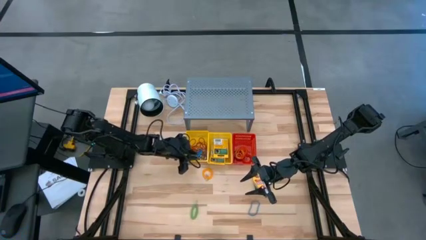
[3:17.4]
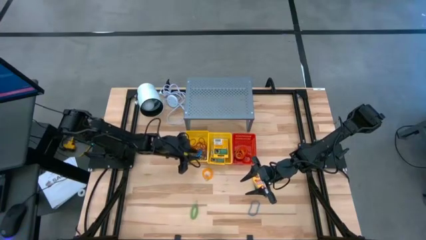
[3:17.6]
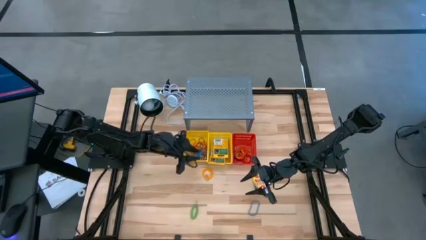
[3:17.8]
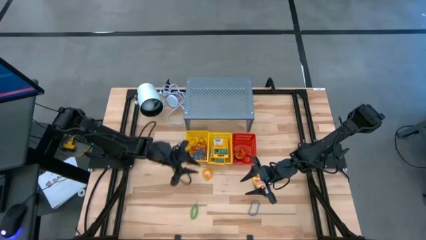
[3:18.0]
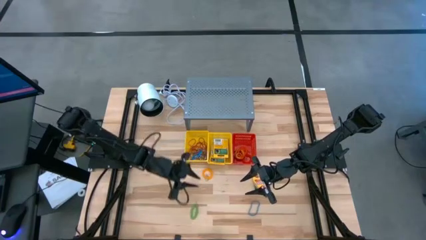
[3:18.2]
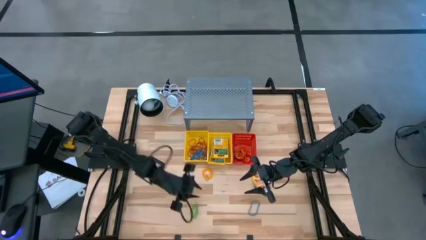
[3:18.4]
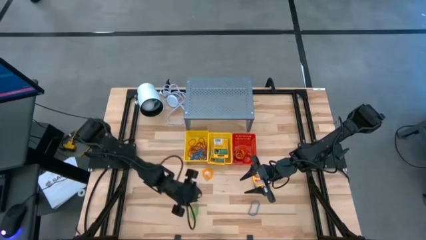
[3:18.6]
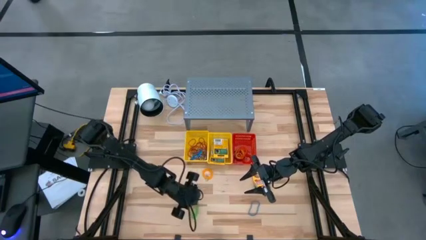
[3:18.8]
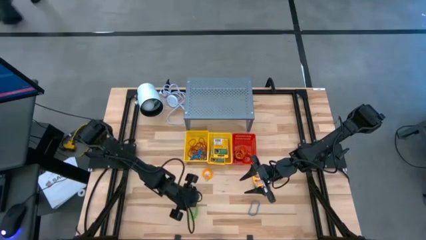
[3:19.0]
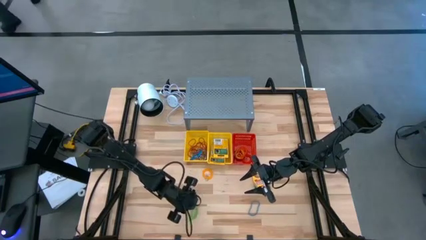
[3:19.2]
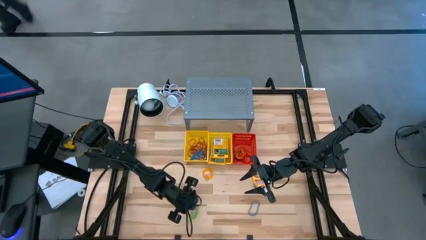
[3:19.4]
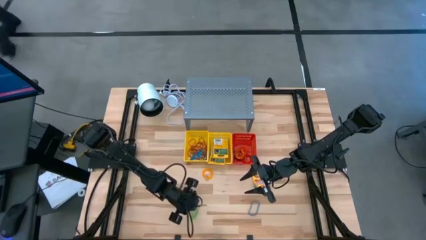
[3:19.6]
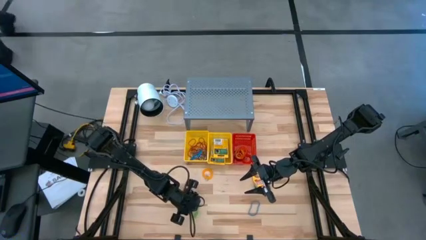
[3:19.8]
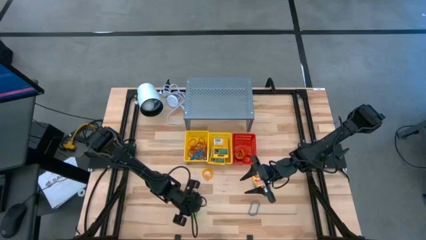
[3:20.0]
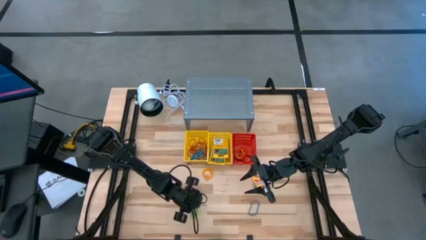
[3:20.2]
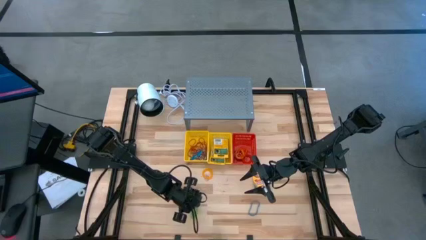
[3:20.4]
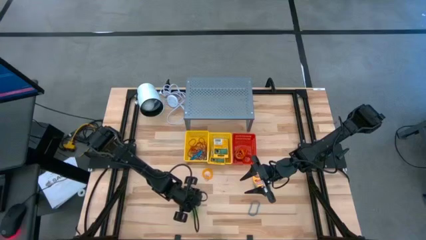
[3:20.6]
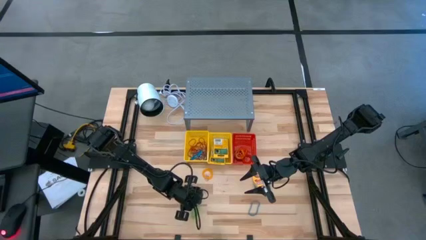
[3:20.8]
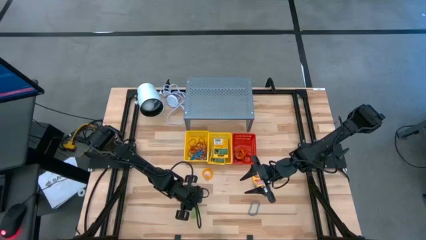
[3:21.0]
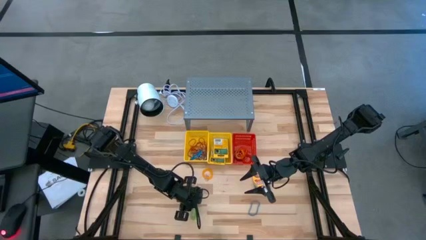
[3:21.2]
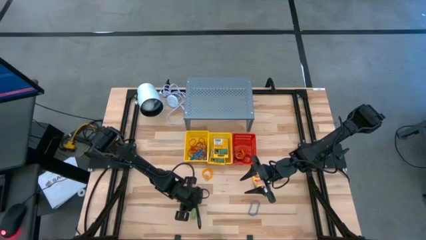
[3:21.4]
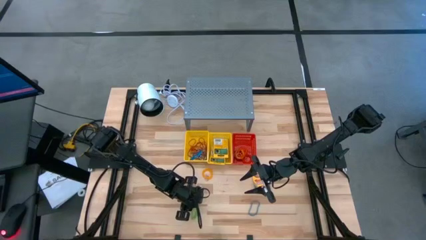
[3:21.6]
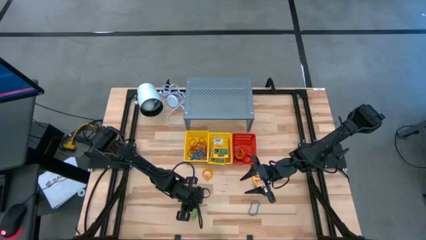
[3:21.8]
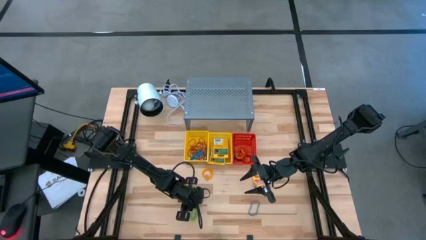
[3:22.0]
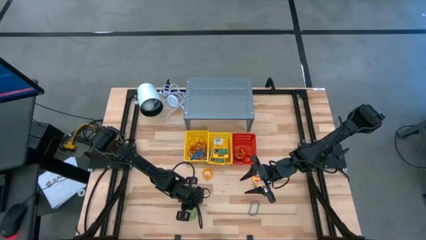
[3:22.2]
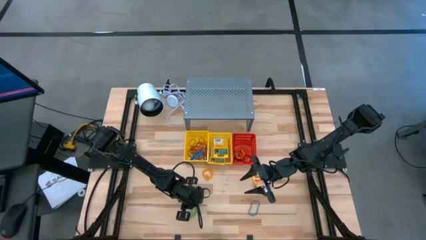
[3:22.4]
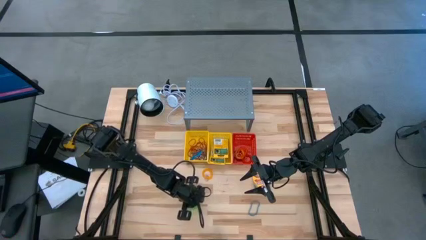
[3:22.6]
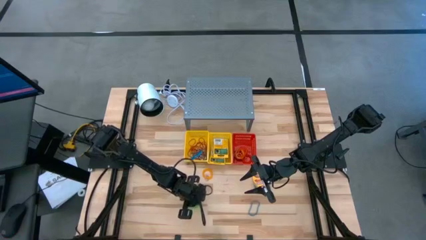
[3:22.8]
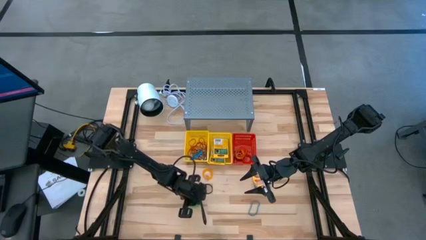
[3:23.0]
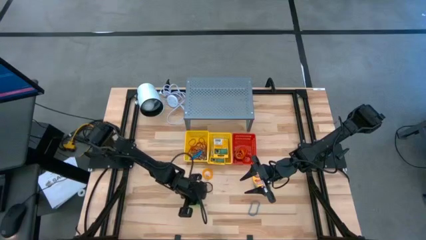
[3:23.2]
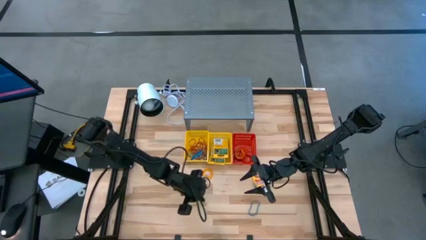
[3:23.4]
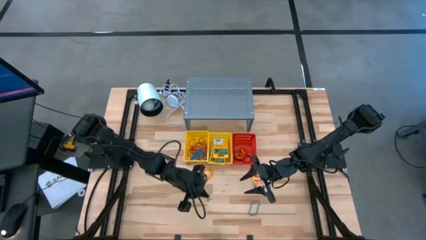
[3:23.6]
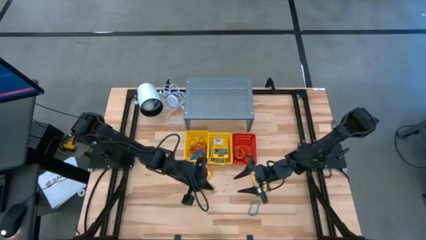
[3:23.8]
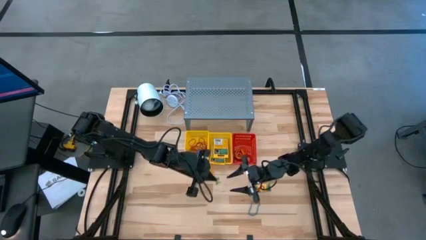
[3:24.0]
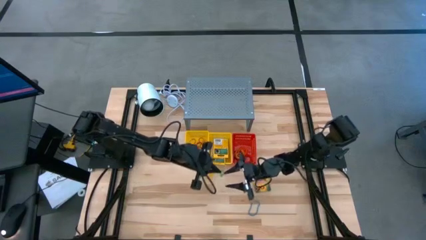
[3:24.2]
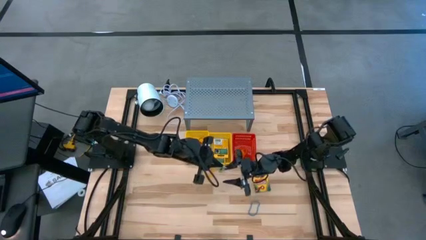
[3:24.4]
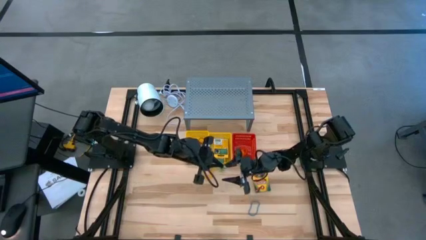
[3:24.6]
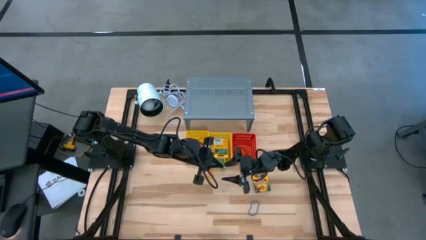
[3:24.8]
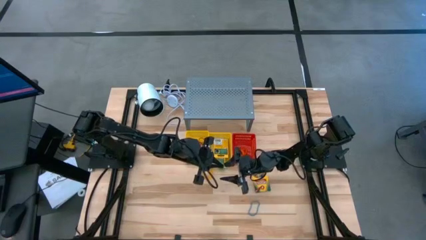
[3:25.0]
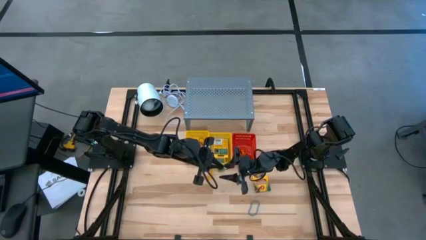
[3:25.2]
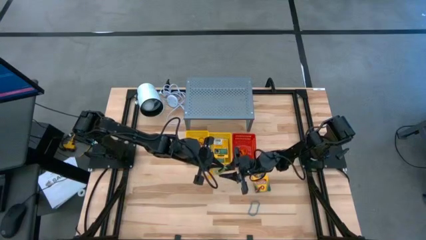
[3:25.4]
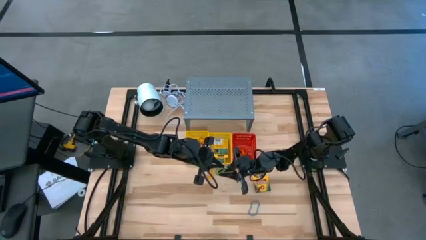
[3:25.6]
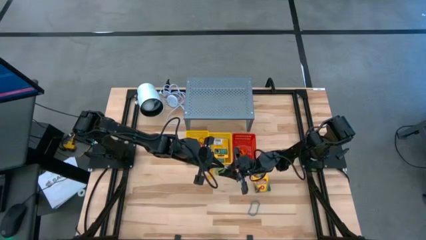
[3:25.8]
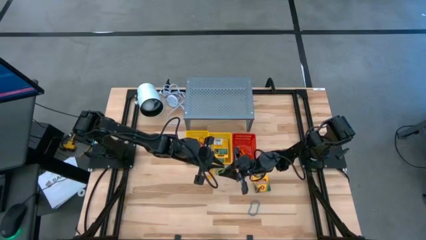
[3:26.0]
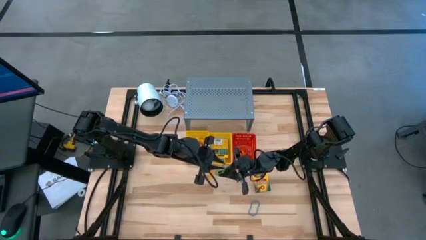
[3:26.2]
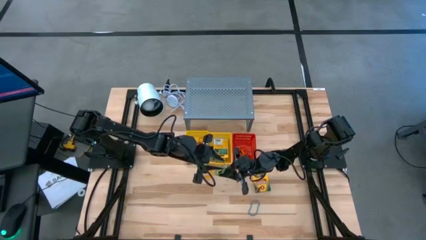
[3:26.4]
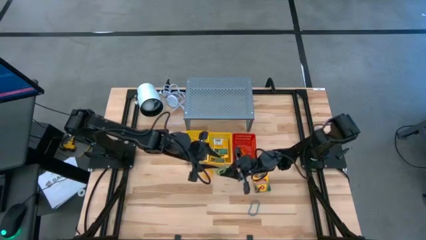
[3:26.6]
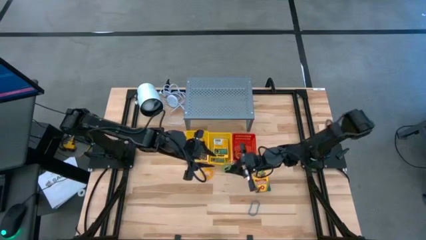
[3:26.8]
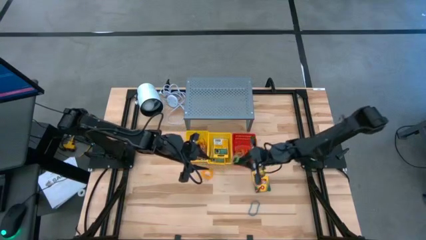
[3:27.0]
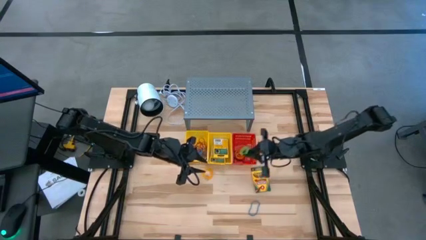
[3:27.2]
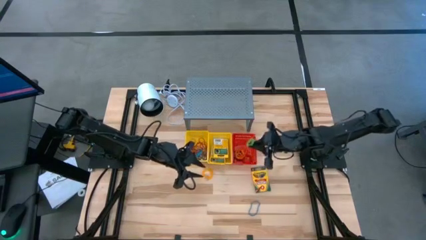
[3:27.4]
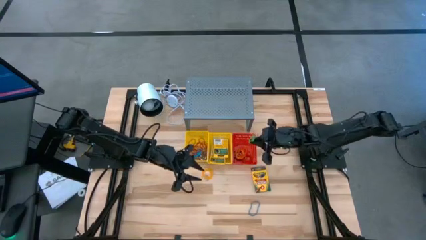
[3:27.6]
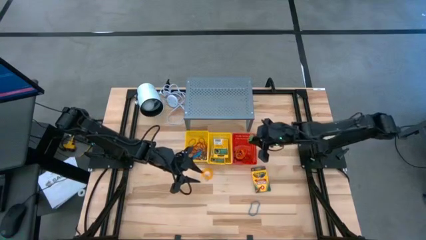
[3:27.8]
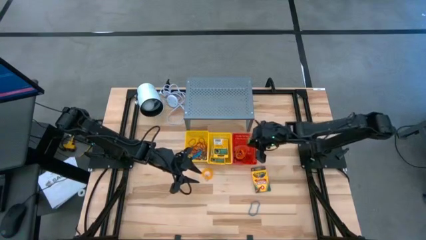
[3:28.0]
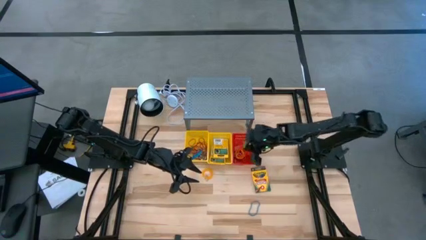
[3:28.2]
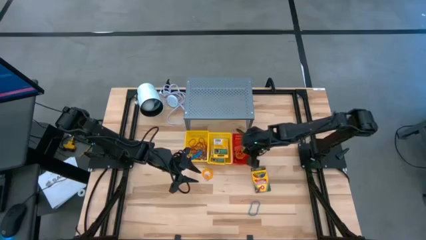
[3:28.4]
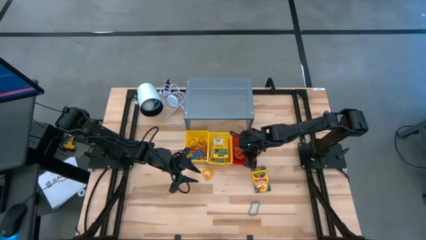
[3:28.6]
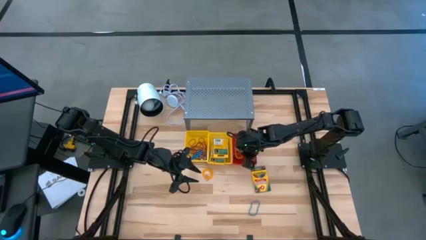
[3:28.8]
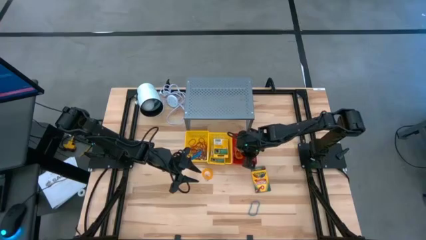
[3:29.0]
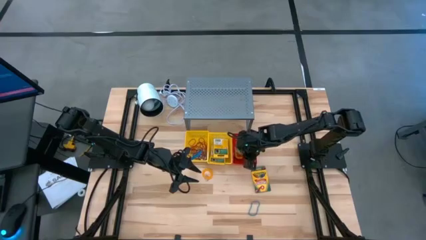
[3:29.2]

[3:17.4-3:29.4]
Task: Pick & Place Office Desk Supplies
Put the green spring keychain into the red basket

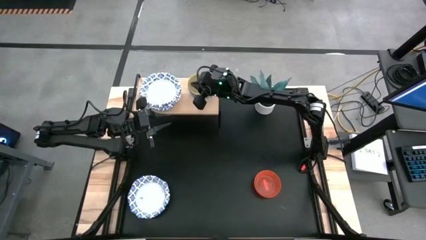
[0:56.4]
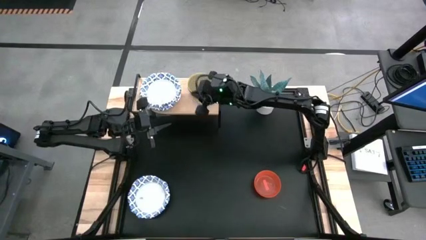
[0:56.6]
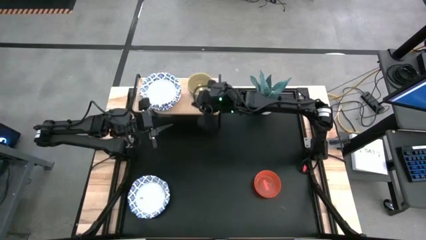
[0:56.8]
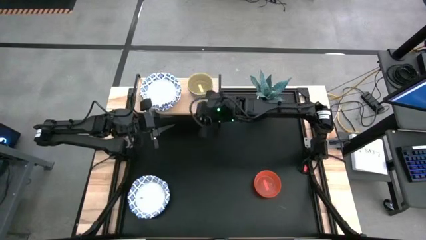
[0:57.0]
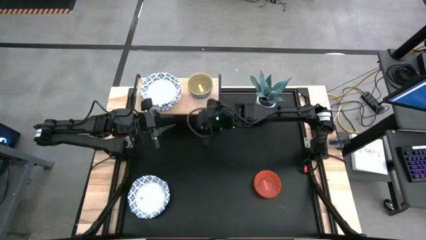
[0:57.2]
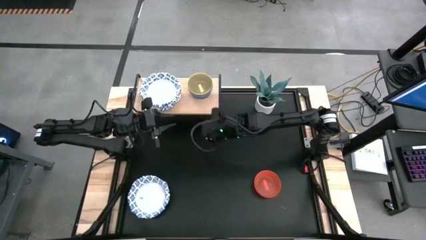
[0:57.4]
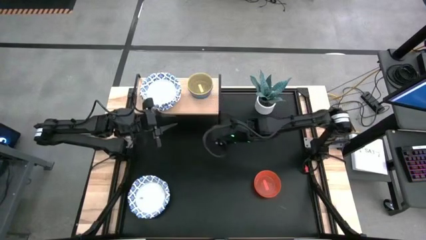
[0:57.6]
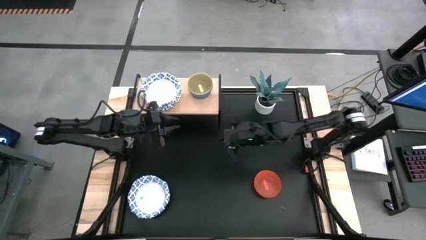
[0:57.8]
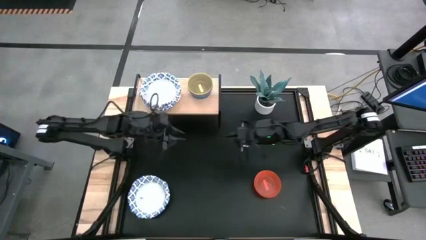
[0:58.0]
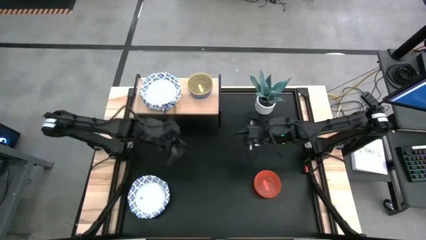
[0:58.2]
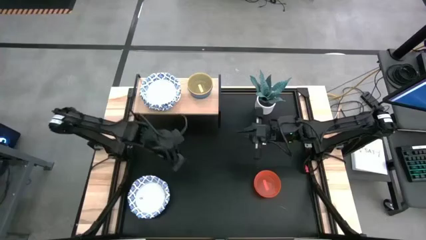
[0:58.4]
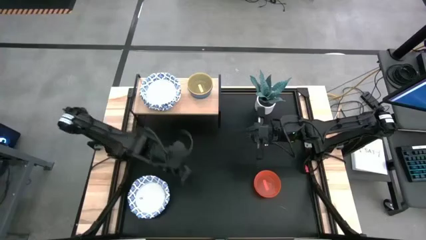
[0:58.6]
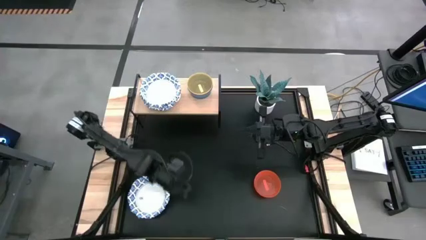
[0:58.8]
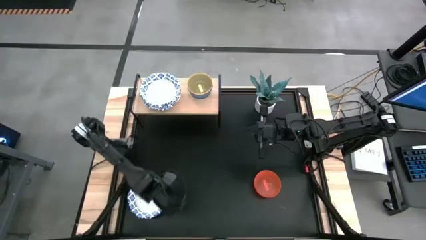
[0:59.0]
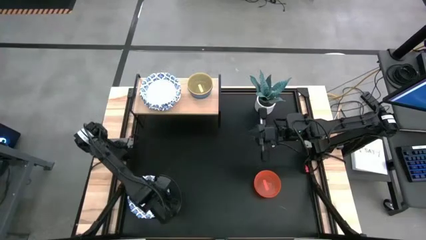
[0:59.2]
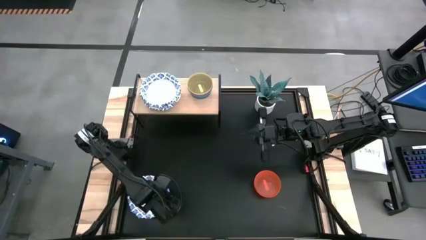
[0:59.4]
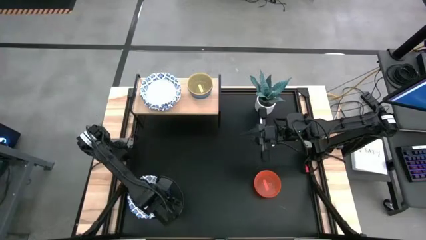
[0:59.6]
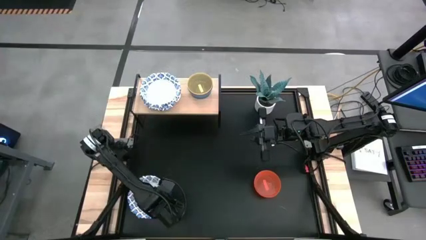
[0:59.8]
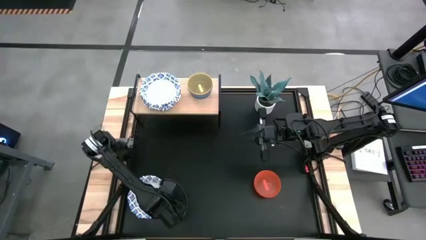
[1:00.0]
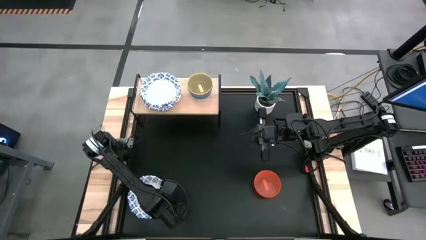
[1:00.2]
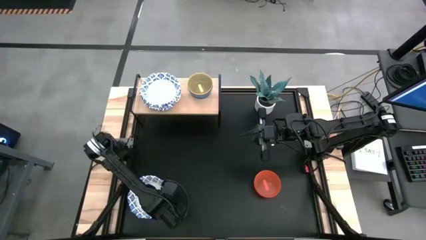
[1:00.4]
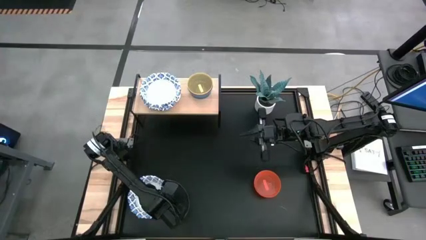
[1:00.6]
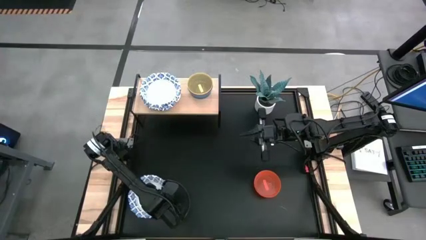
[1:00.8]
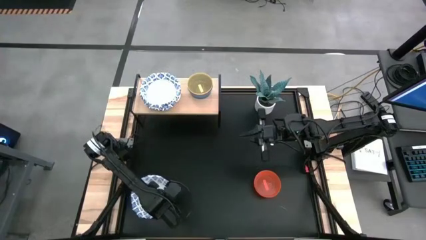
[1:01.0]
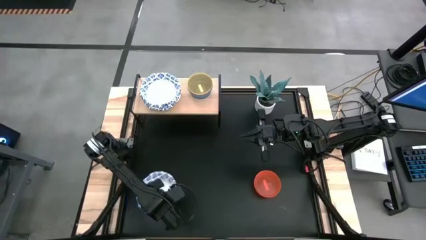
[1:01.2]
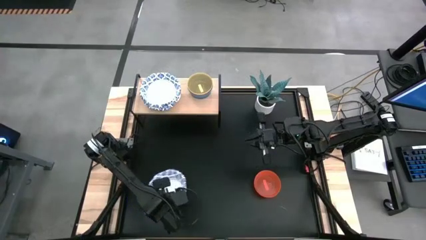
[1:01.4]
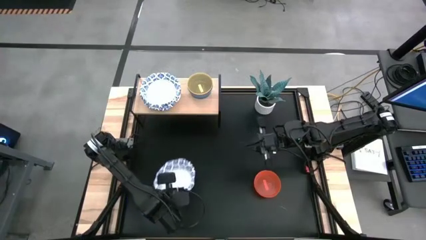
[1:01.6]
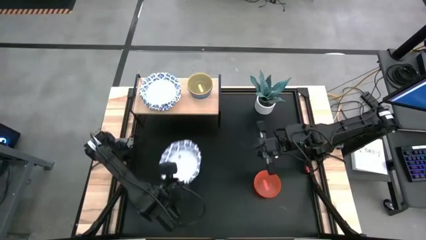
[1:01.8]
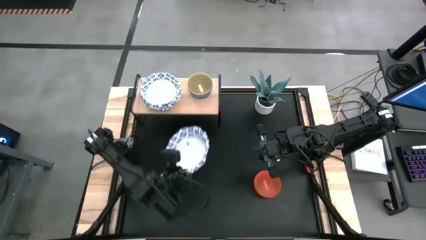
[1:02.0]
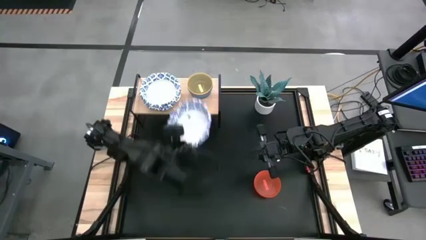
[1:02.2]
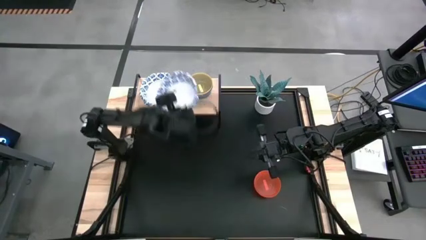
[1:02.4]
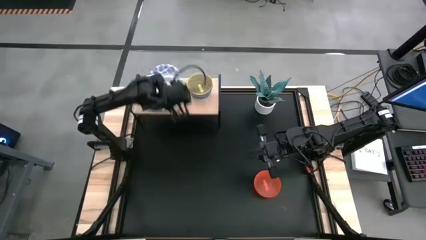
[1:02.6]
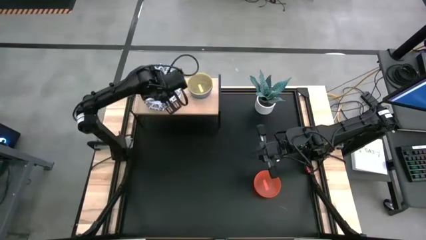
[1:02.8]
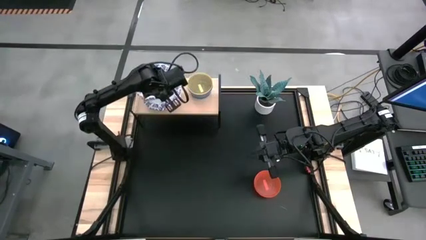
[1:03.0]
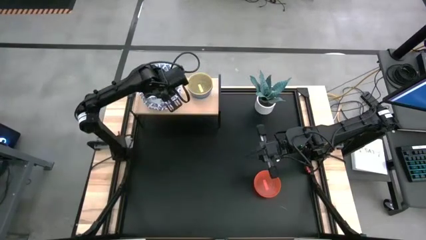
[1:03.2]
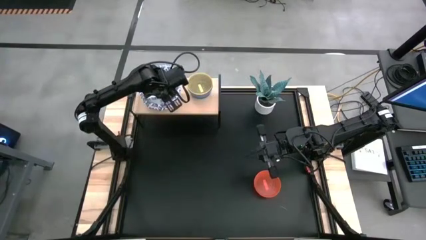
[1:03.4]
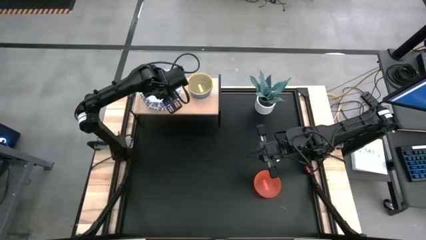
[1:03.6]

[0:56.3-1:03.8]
Task: Place and stack bowls onto a shelf
Stack the big white bowl on top of the big white bowl on the shelf
